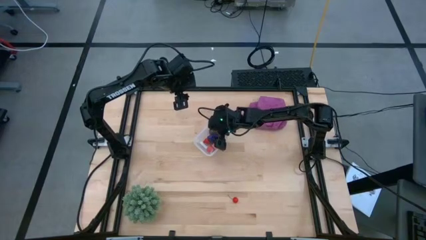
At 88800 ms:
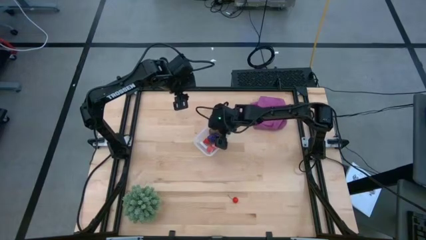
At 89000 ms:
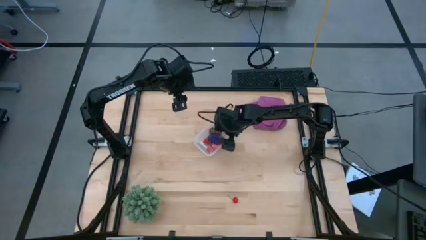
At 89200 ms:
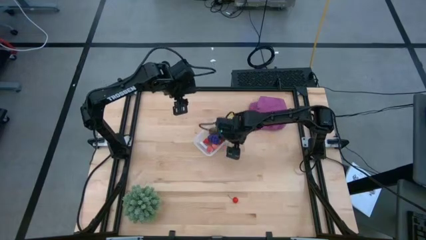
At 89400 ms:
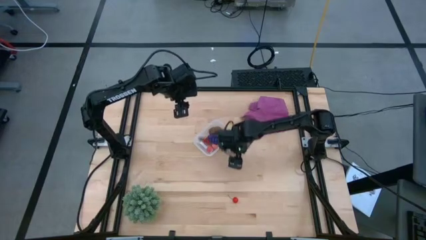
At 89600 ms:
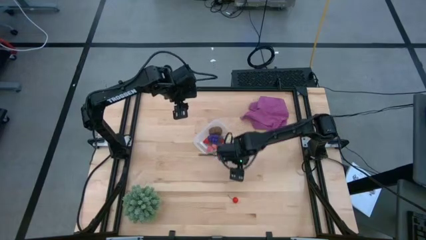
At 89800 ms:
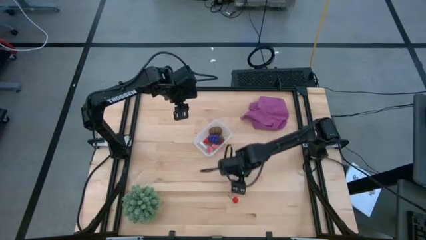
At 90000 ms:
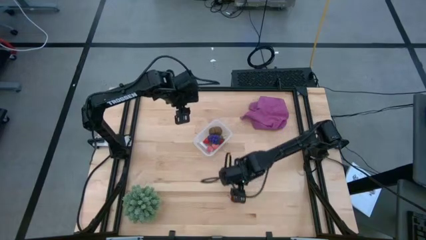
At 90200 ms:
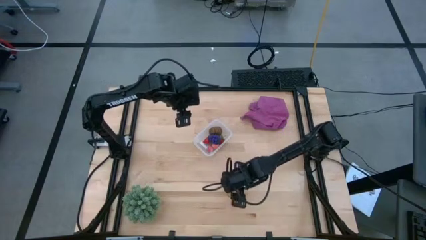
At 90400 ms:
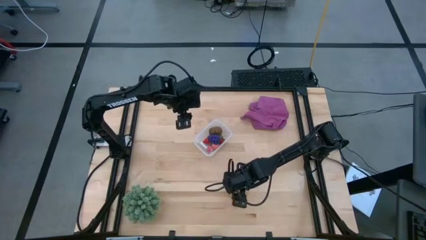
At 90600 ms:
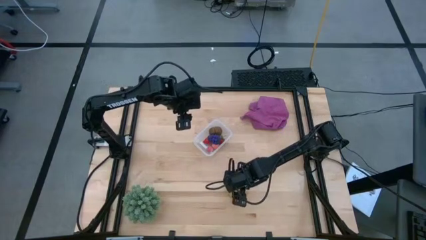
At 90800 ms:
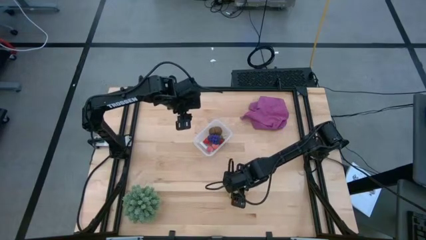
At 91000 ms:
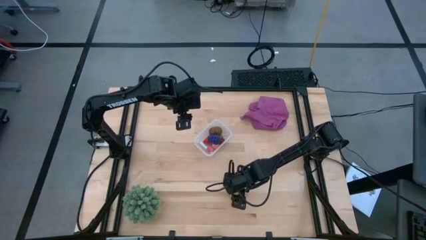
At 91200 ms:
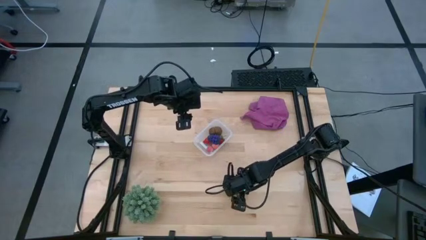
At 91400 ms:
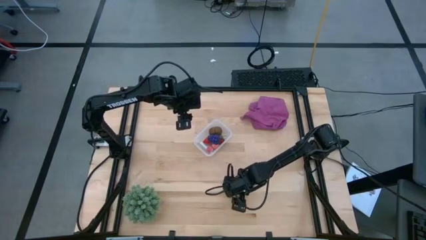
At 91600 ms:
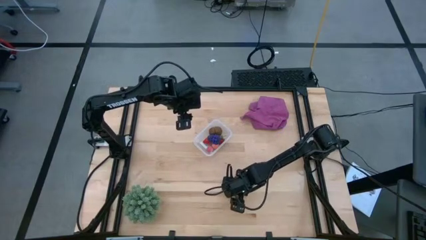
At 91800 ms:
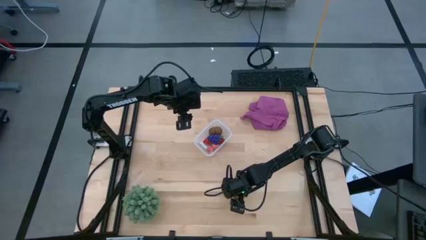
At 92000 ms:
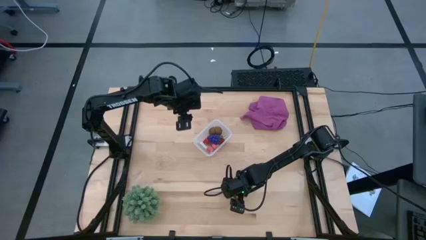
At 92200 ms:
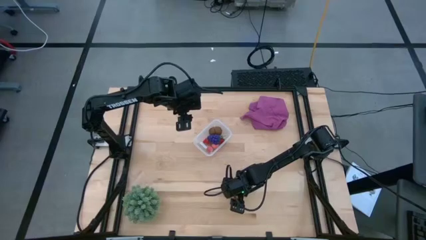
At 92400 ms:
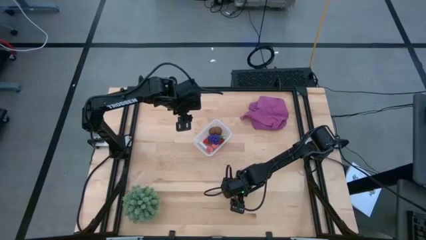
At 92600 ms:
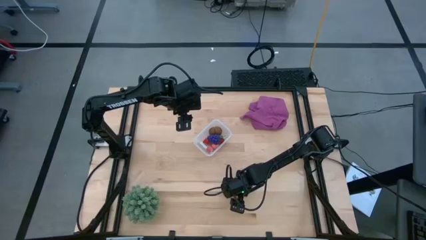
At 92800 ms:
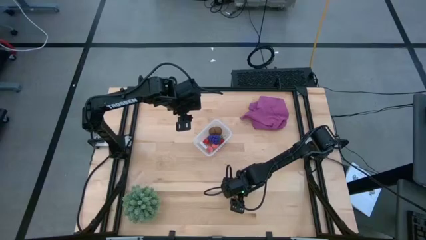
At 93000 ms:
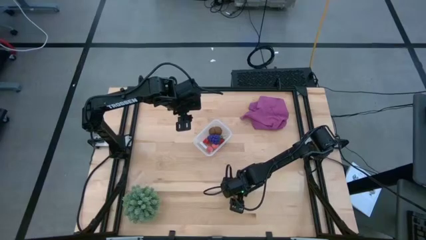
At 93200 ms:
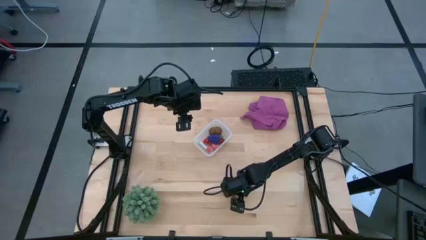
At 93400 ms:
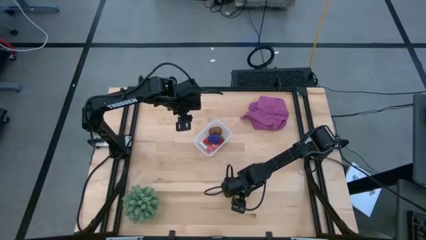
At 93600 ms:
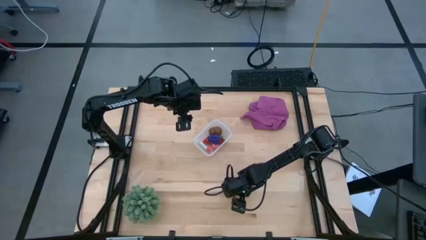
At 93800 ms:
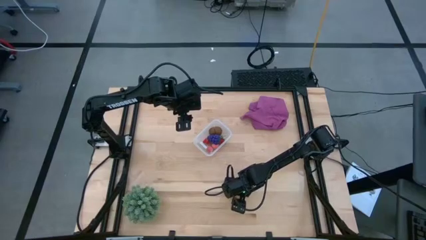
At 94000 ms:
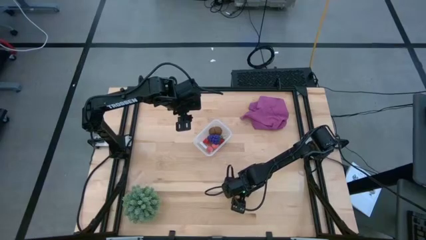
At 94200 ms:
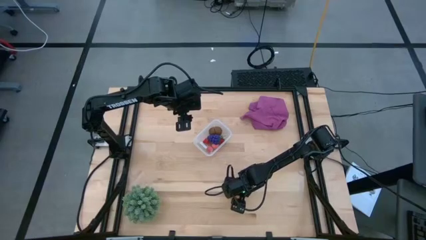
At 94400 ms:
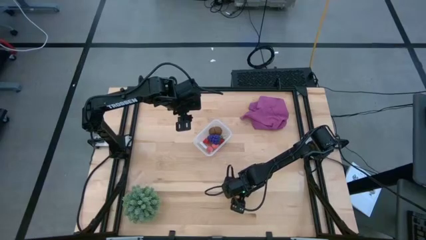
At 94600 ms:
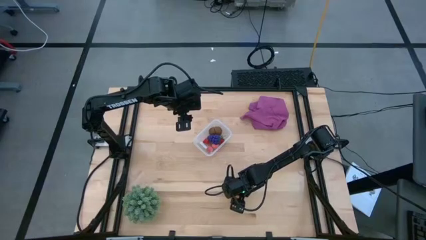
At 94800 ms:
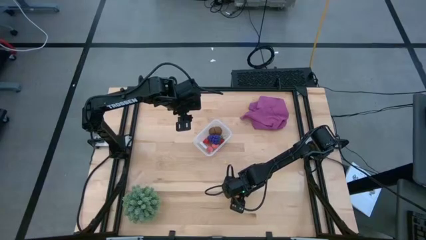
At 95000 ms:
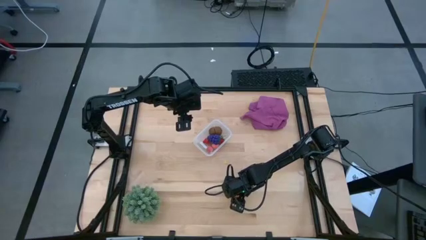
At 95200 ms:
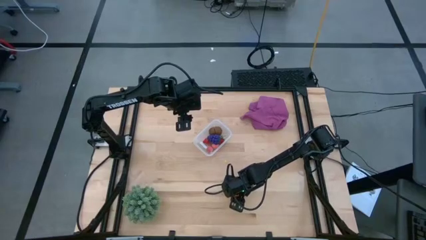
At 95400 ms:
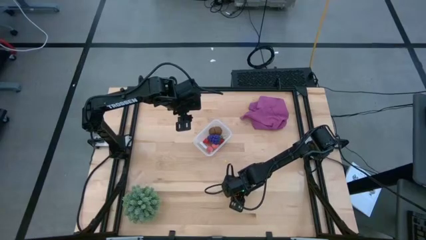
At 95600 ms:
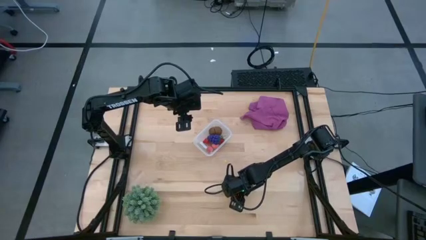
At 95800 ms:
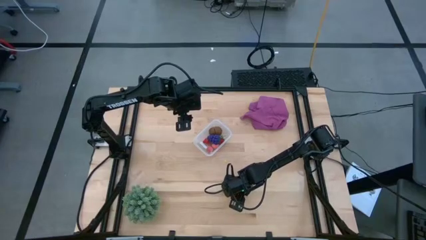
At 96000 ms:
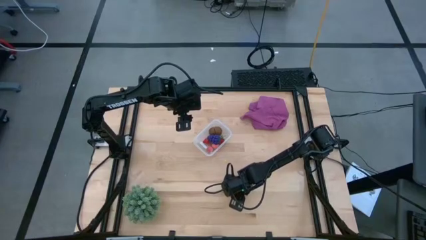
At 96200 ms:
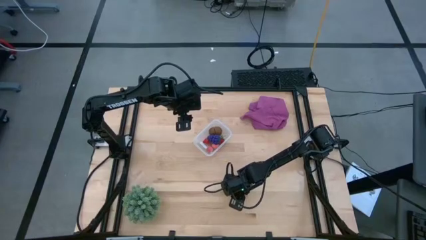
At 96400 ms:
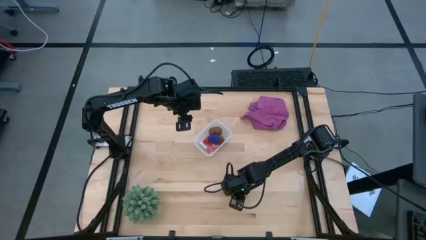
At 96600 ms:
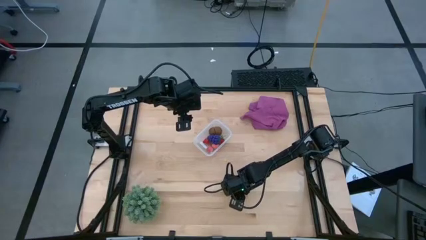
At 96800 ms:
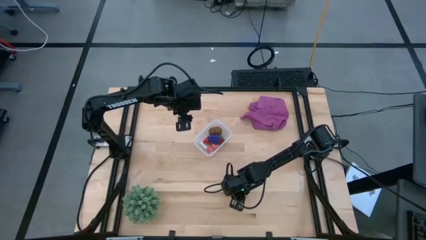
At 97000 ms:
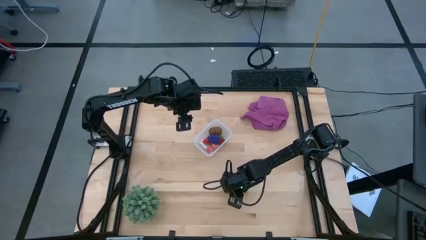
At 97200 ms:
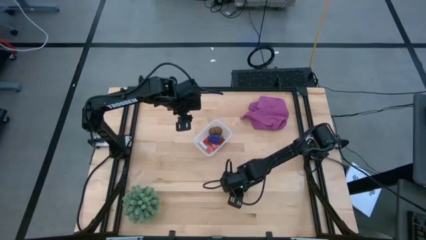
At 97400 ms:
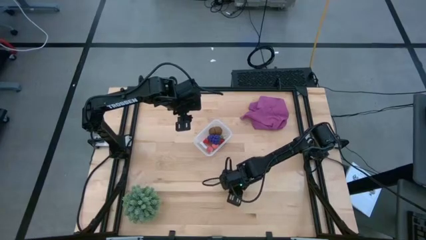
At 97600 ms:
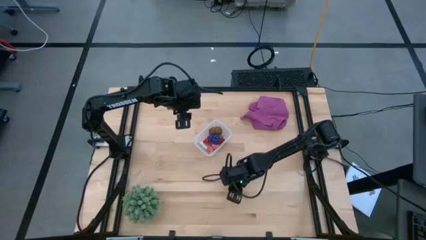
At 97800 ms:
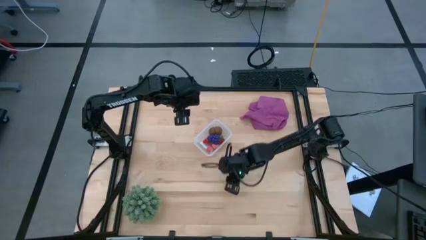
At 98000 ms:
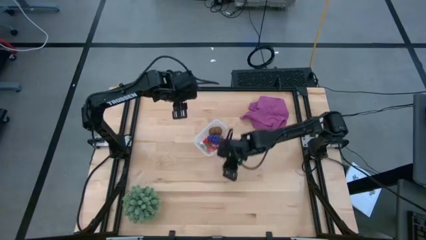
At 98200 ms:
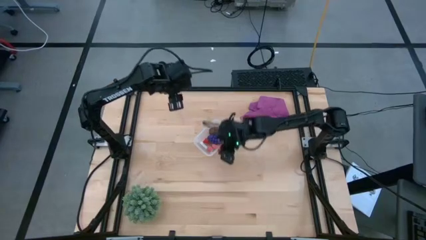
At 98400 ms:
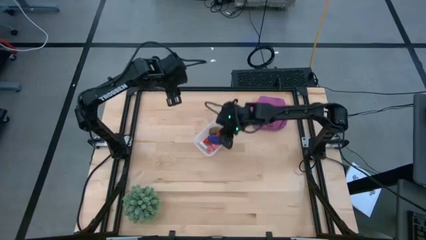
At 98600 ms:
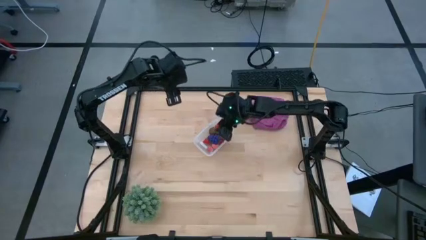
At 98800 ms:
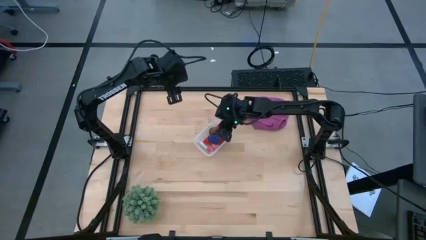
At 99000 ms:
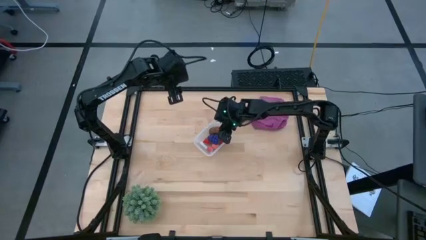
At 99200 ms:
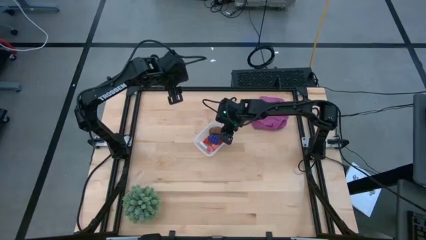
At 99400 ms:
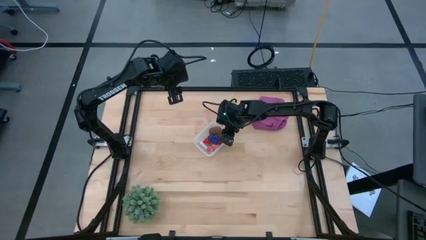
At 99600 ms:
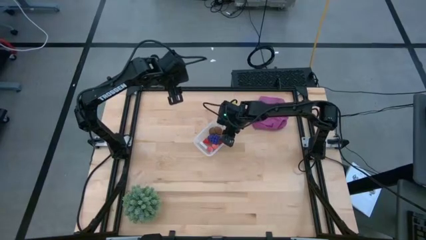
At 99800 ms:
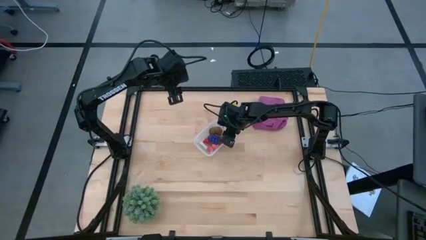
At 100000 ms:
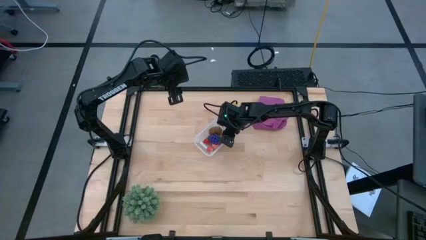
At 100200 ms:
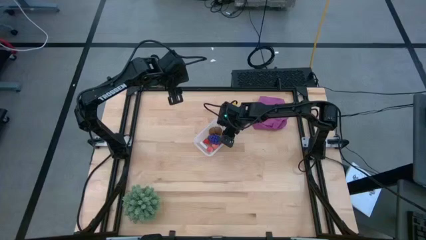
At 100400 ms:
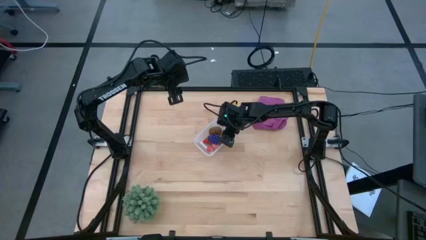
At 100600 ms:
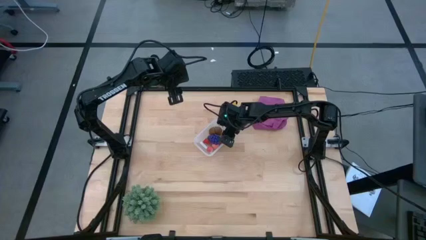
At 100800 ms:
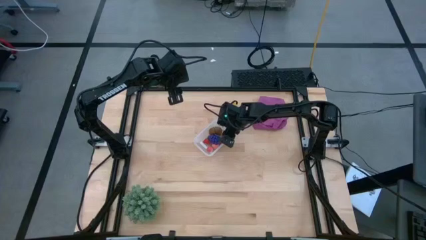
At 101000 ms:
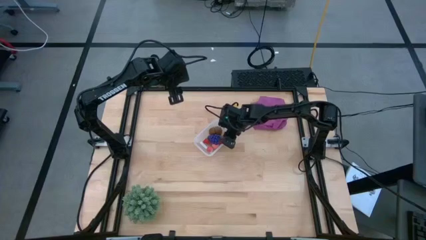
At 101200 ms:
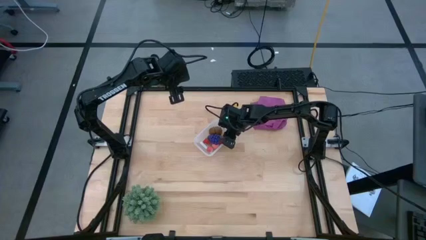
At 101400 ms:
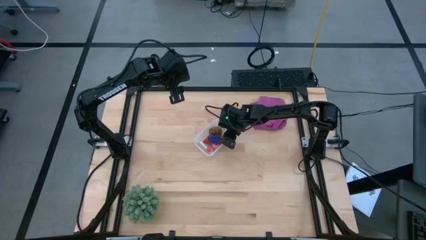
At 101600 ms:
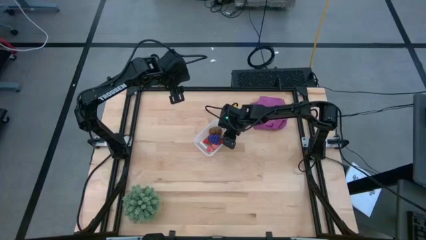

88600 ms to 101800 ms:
Task: Pick and placing Produce into tupperware
Put the cherry into the transparent bin

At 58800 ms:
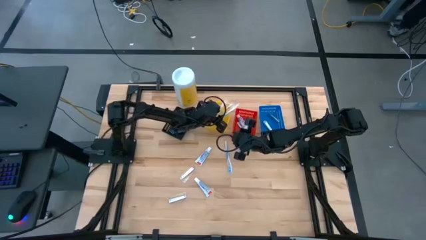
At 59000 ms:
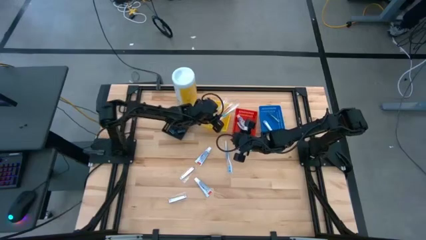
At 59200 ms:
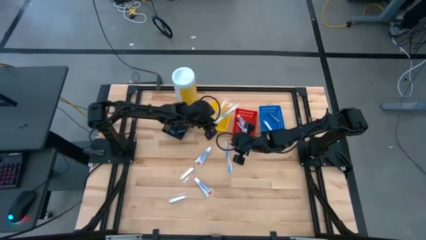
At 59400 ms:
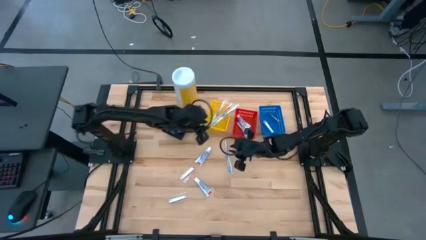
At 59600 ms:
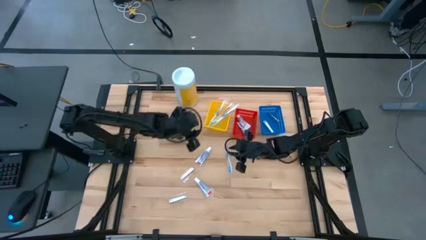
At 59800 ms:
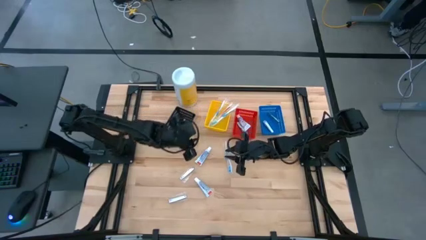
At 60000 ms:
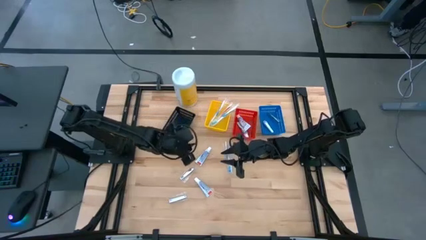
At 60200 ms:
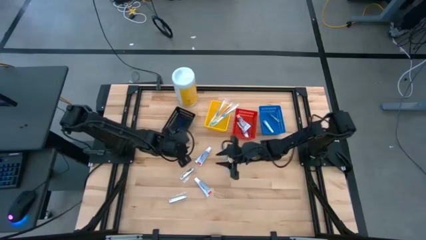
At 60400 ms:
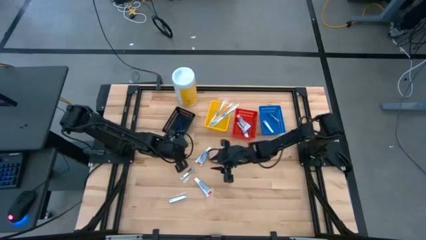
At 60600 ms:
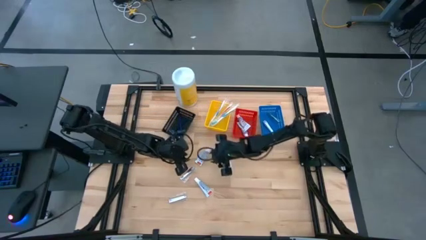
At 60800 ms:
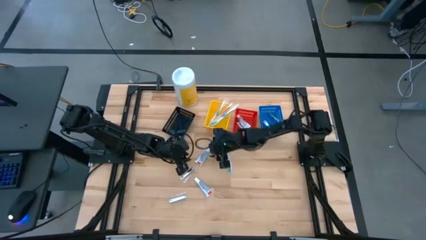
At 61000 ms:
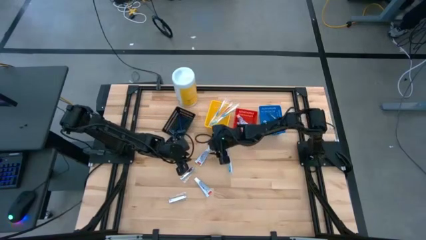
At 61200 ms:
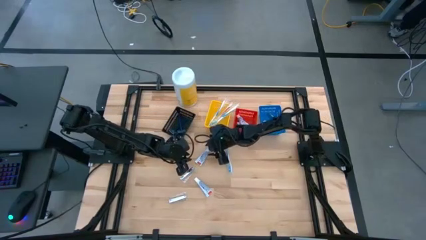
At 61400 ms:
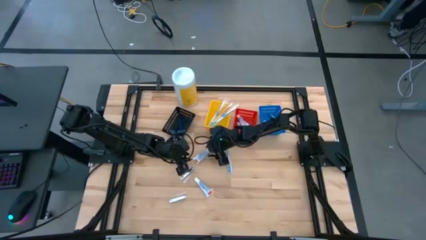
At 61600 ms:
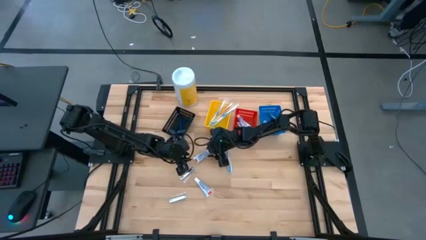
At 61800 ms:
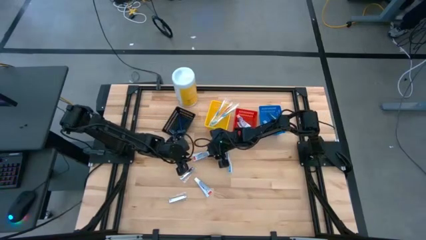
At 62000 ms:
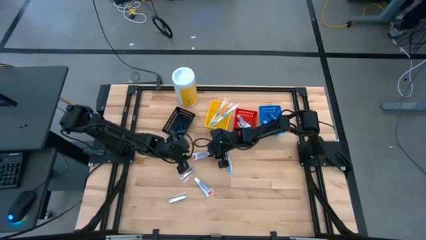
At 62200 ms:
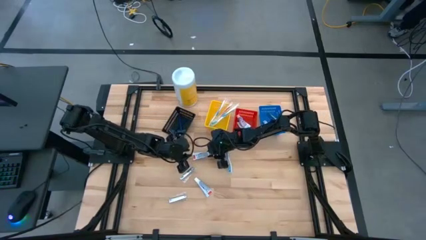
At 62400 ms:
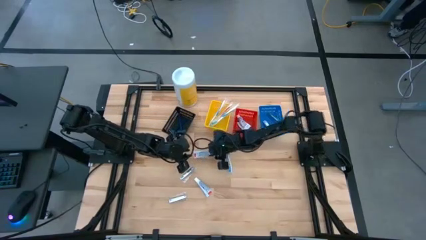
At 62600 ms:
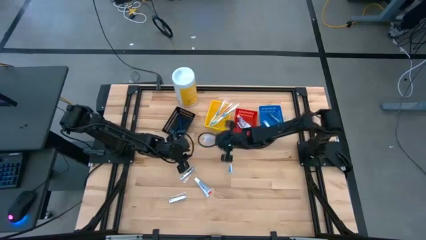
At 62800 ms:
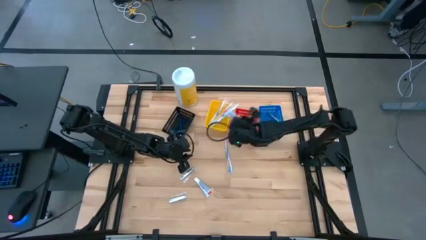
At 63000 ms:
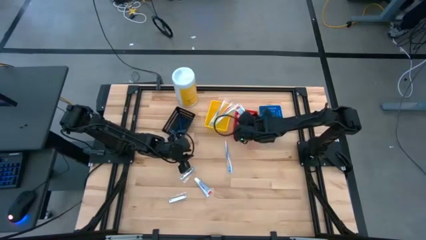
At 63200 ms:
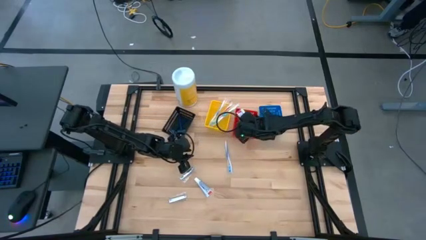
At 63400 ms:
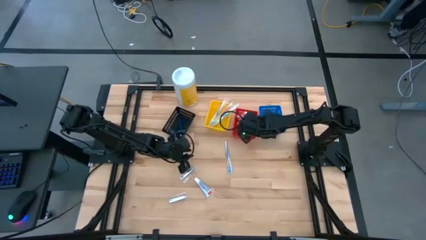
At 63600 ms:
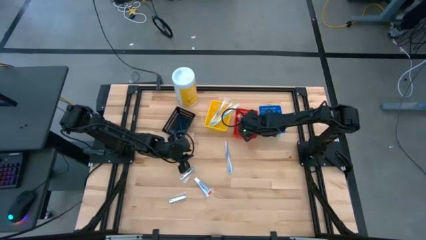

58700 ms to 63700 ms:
Task: Pick & Place Travel size toiletries
Put the white toothpaste into the red bin
